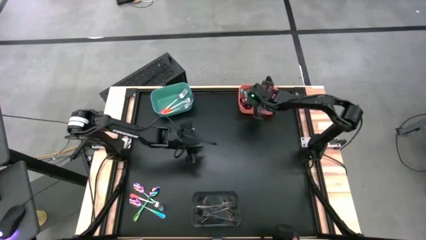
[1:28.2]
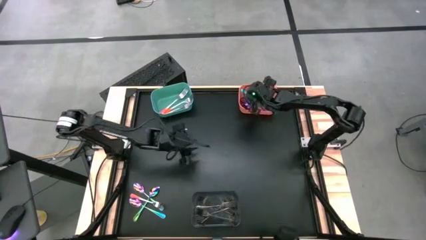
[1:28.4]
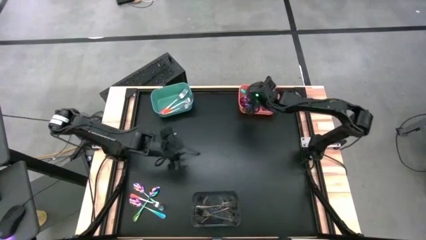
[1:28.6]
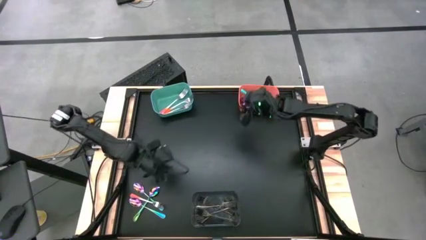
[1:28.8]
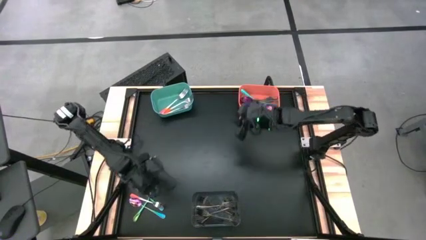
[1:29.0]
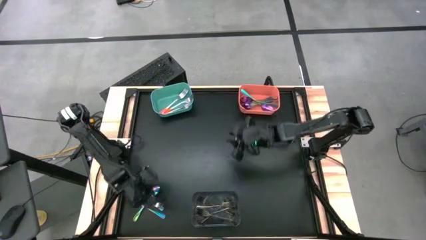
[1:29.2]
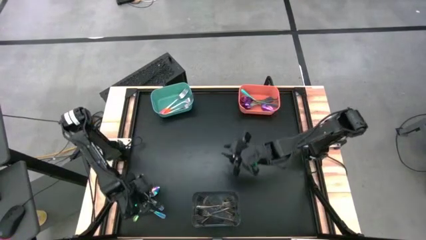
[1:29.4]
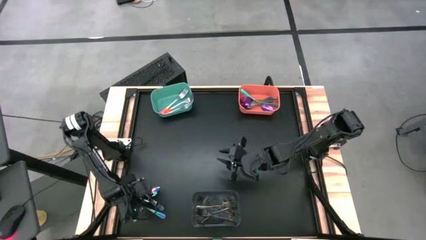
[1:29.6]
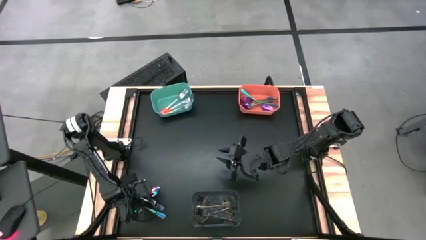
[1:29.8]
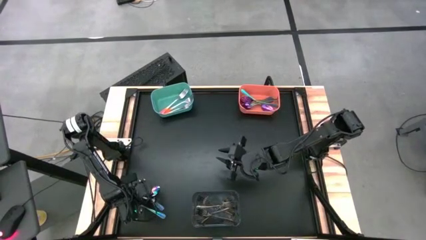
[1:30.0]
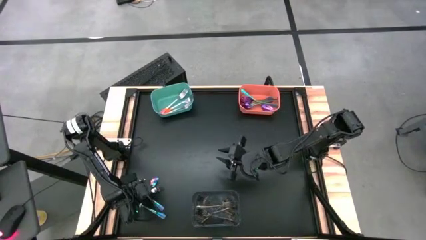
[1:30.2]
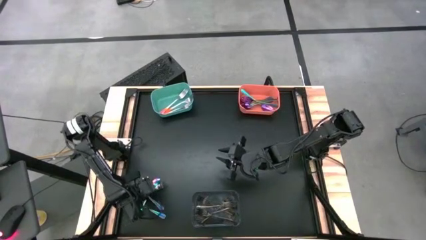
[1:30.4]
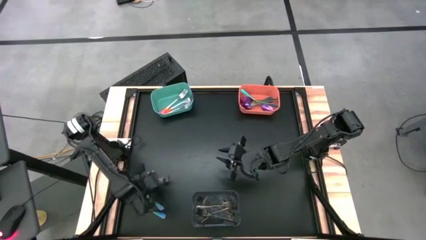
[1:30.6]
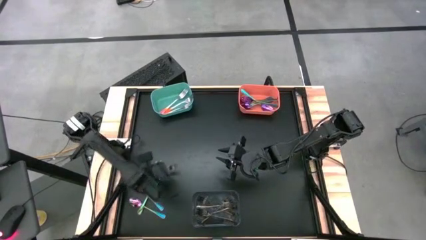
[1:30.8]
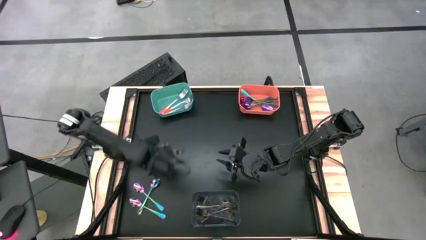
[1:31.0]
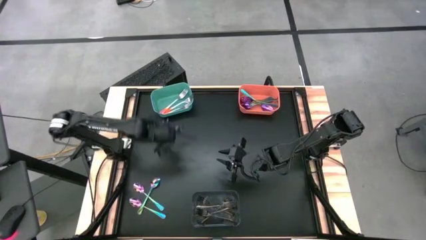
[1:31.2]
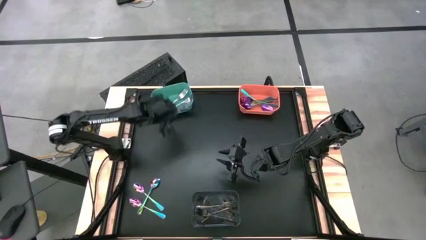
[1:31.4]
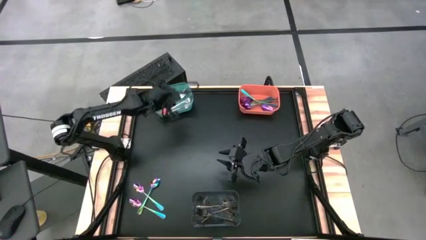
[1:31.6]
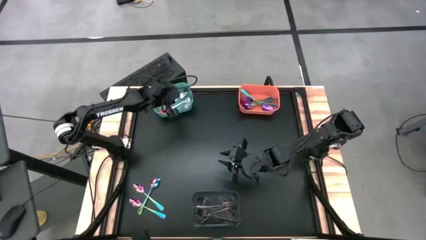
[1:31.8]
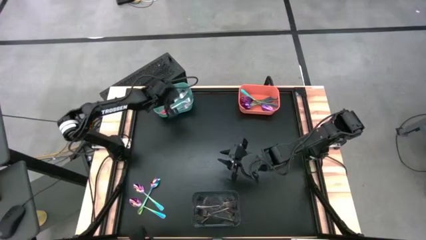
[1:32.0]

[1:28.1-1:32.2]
Task: Sort silverware by color (type)
Put the orange fork into the green bin

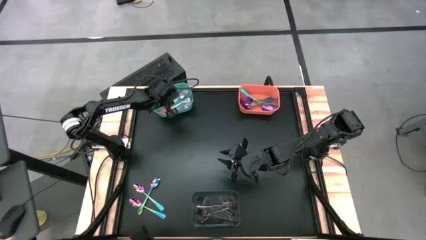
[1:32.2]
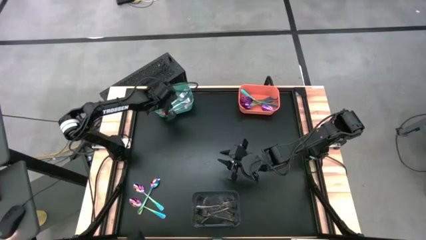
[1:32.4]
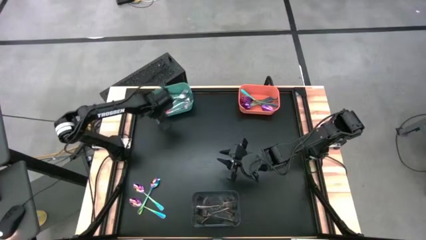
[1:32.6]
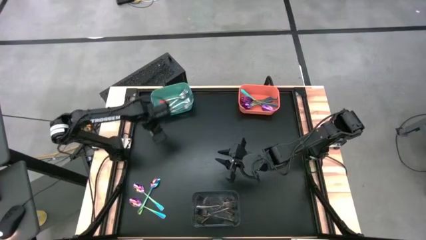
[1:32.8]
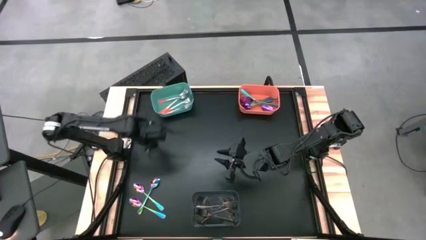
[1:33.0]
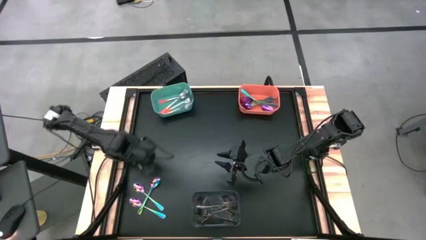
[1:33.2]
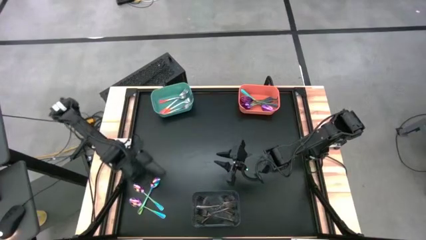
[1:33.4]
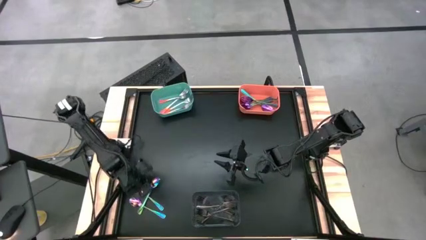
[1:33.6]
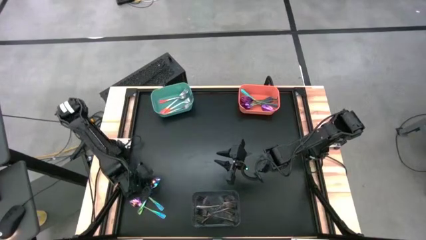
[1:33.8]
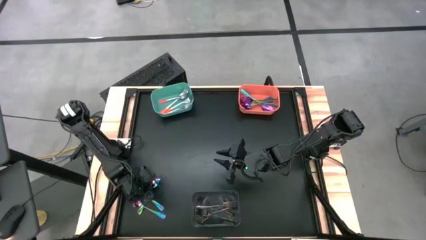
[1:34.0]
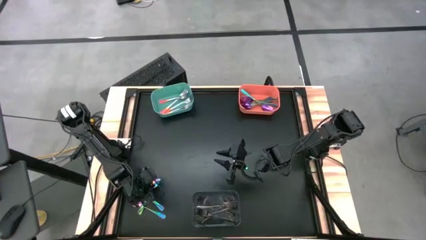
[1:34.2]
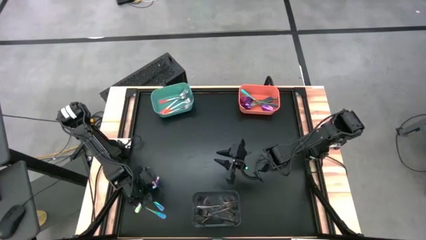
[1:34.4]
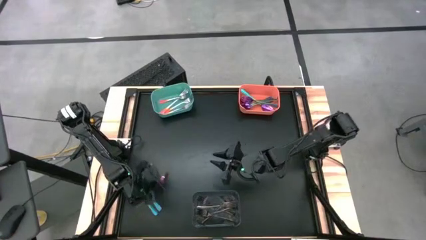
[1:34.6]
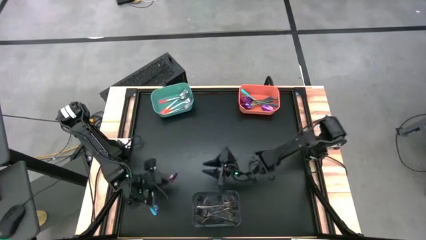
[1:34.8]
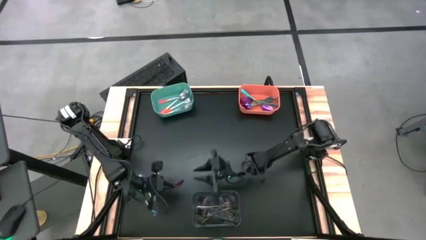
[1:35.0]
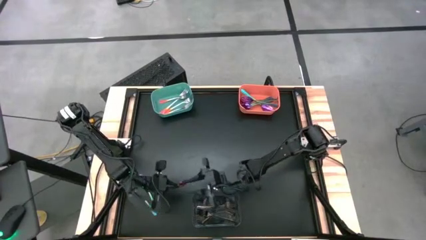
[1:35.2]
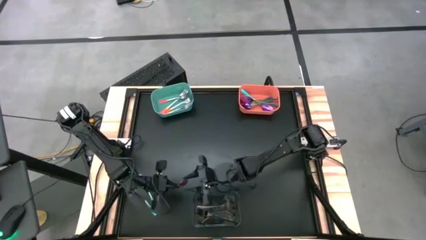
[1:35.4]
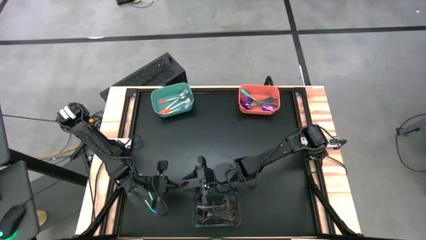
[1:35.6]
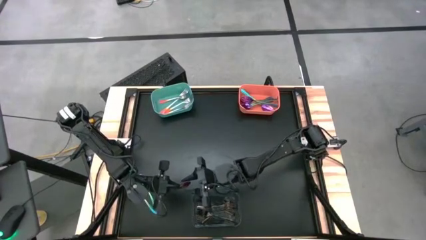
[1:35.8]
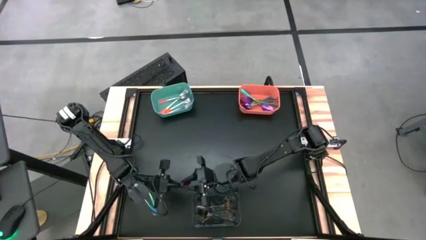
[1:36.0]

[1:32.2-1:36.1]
Put the blue spoon into the orange bin

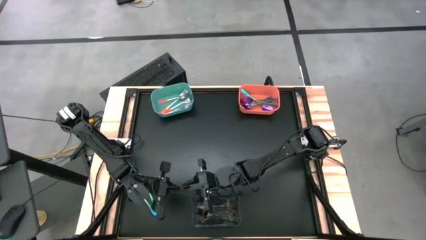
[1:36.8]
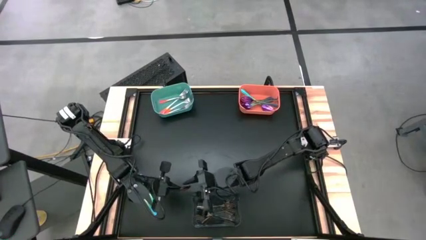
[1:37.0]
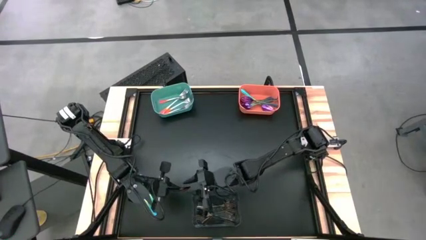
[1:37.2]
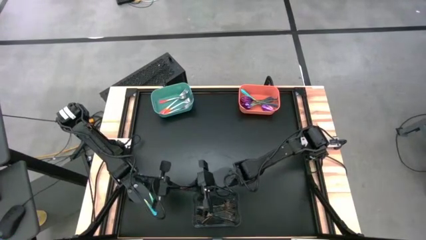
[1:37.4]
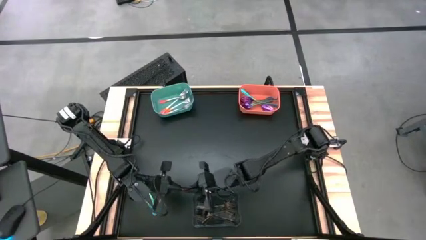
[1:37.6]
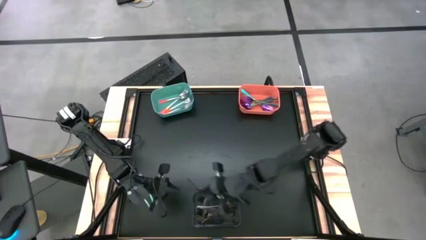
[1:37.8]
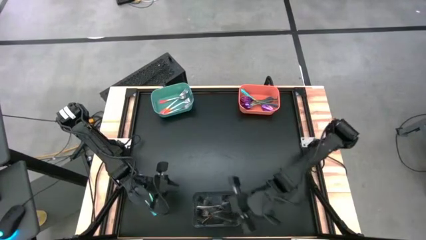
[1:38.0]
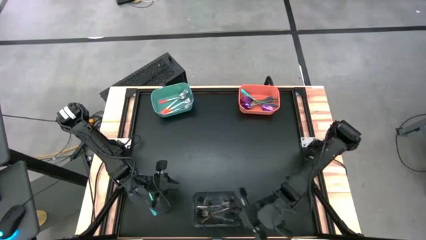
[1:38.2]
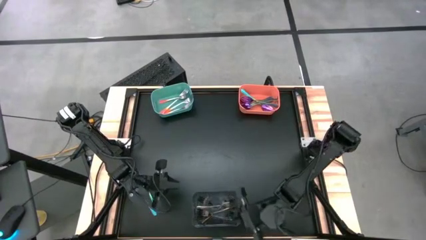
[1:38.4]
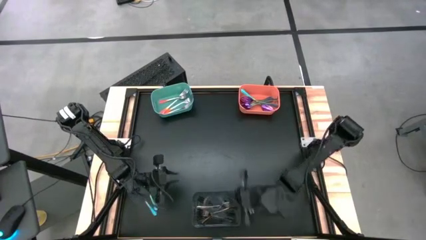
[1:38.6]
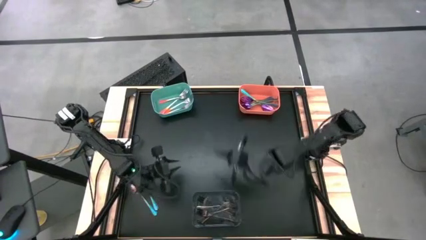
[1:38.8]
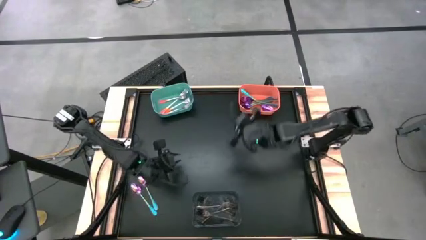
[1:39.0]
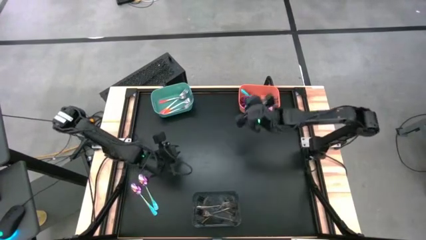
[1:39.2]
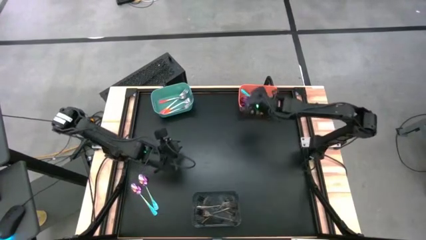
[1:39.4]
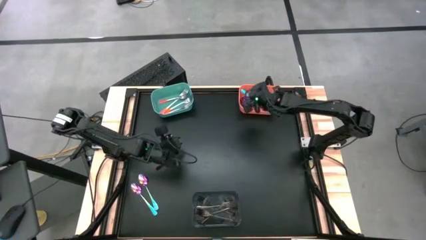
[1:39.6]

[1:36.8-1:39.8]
Put the blue spoon into the orange bin

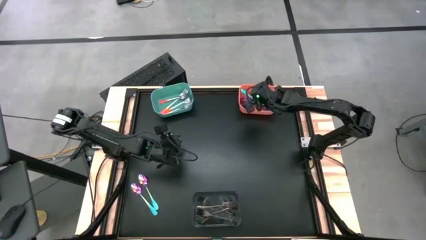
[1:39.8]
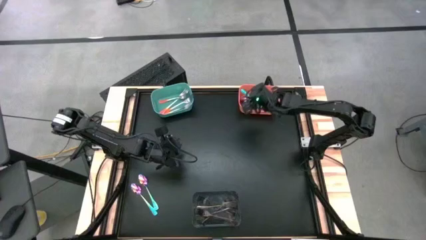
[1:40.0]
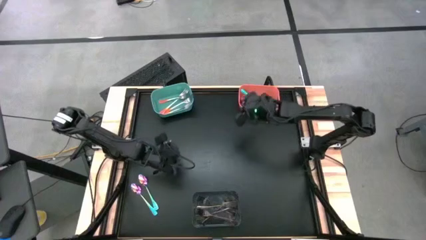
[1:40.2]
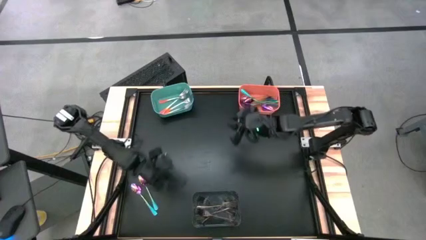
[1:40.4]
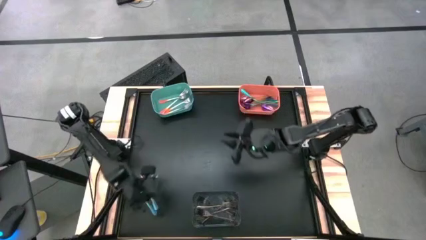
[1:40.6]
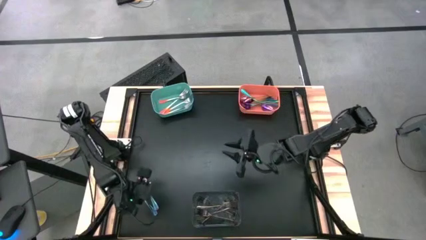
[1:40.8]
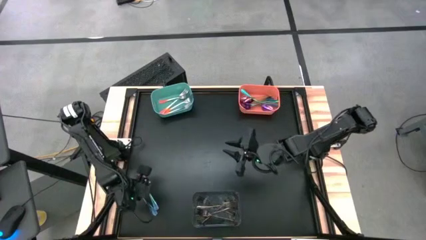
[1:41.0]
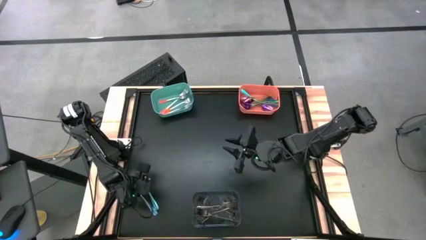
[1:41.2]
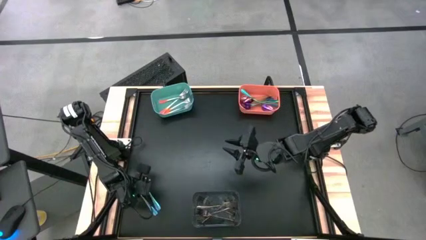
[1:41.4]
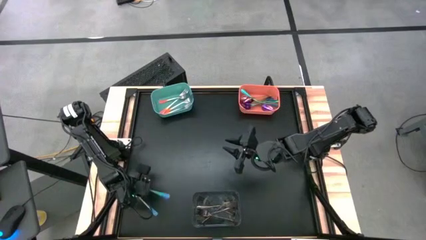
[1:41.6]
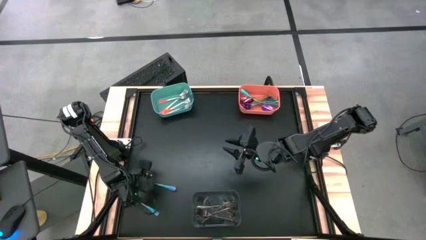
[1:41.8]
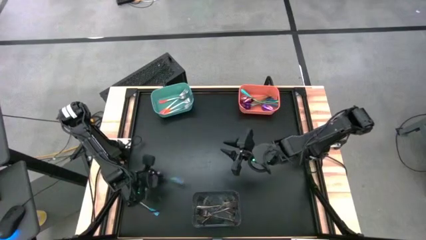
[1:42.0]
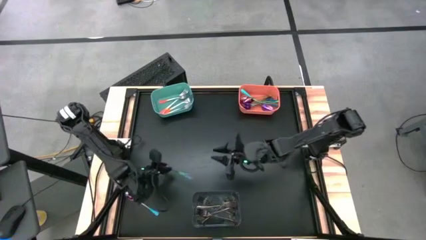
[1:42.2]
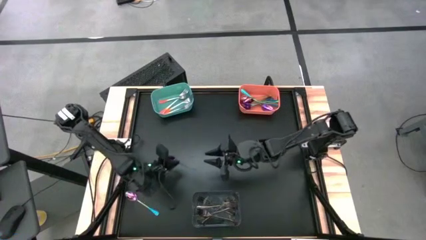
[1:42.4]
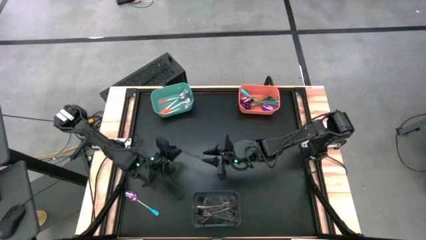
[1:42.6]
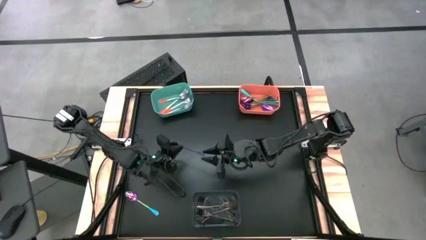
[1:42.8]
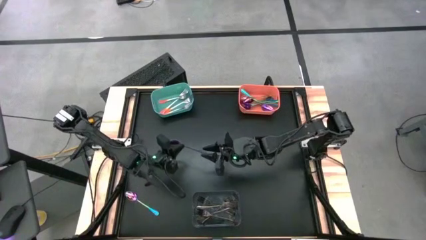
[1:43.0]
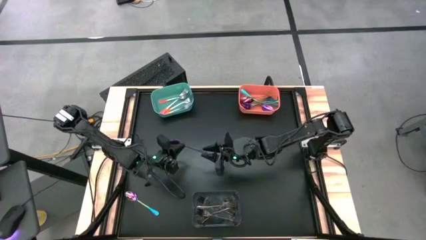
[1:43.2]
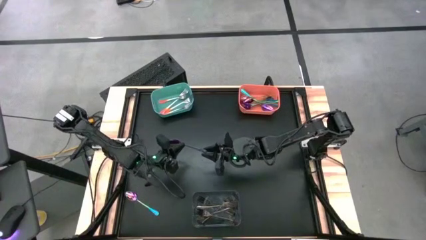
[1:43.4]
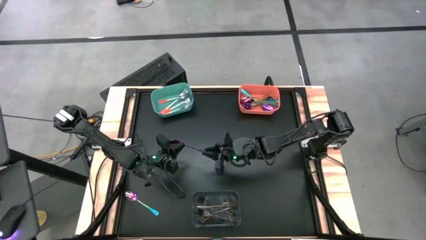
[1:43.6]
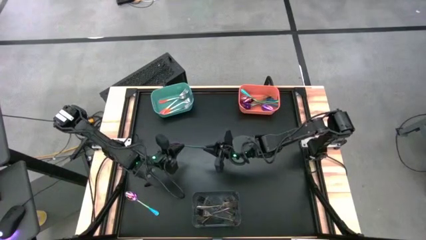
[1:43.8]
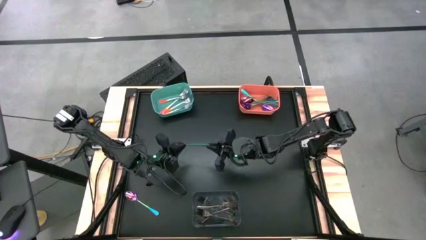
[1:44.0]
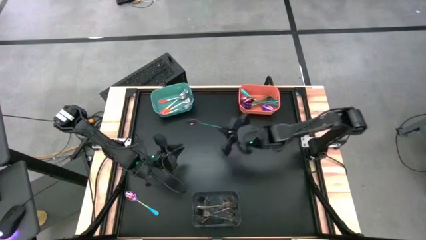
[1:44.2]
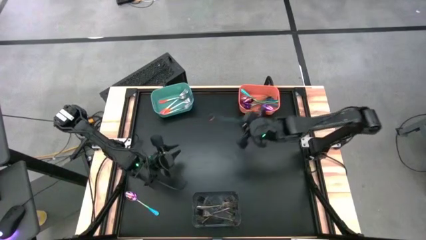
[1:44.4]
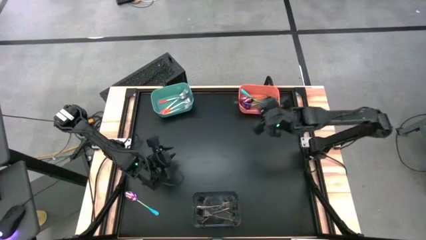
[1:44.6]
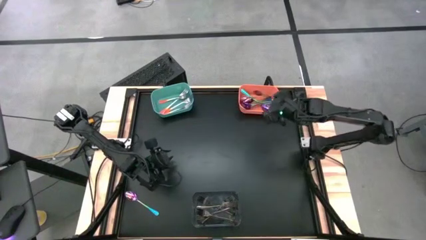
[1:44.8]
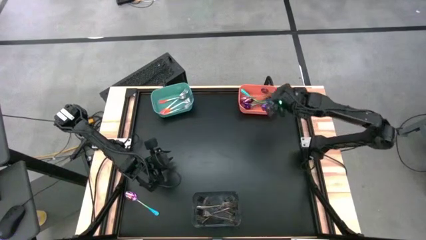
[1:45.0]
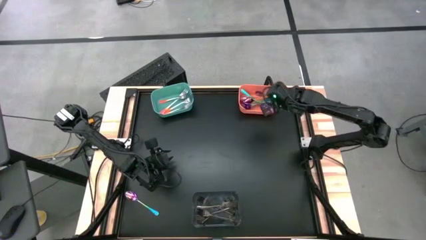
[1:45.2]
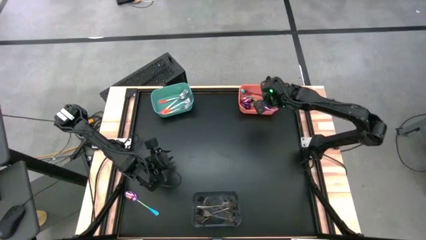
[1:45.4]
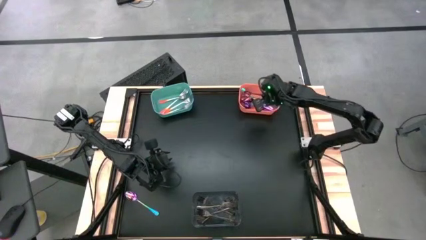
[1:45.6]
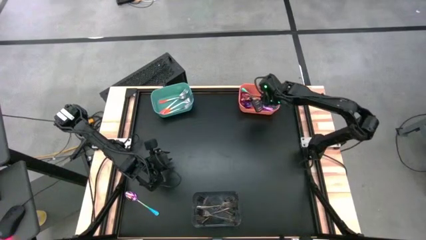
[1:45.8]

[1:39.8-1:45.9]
Put the blue spoon into the orange bin

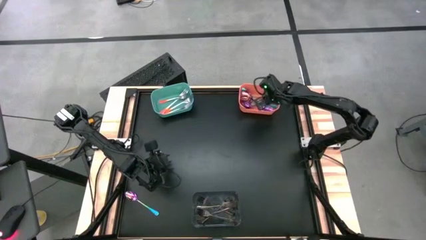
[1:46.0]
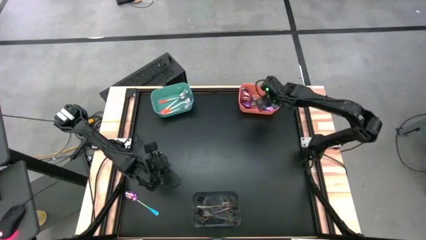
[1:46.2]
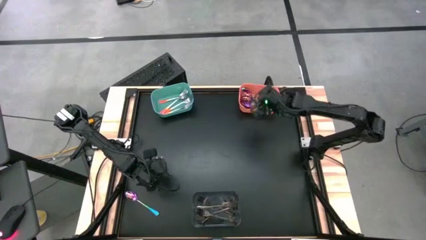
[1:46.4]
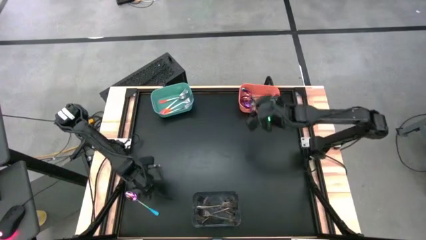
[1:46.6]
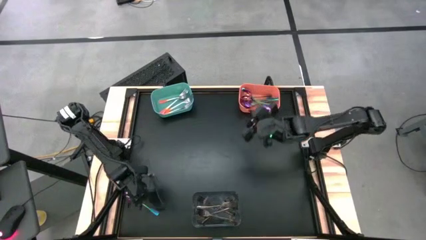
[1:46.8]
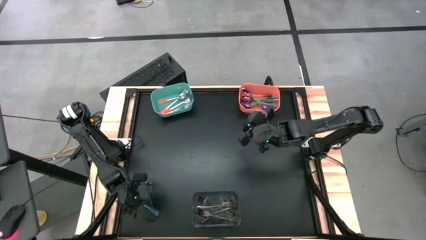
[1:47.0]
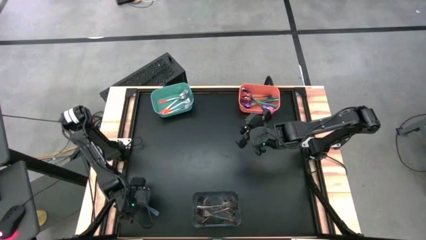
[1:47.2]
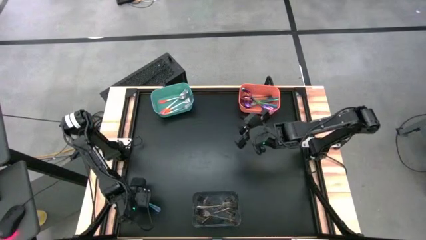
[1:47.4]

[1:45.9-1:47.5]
Put the blue spoon into the orange bin
